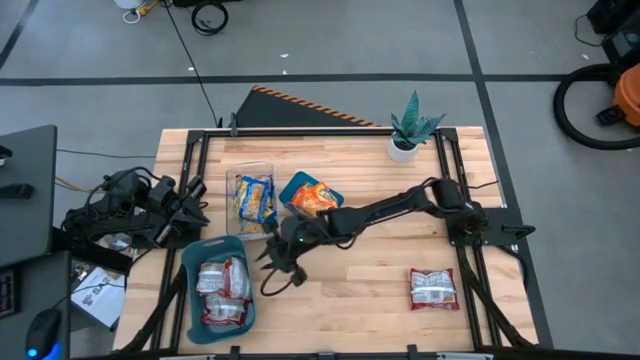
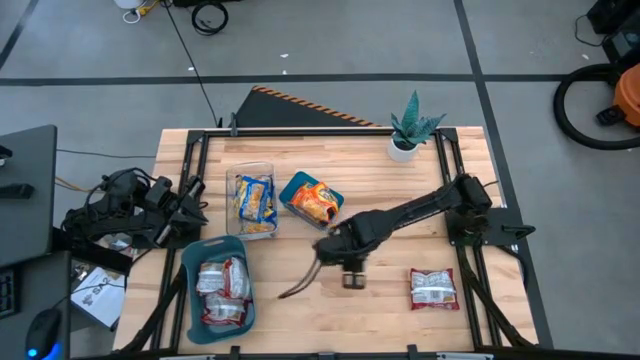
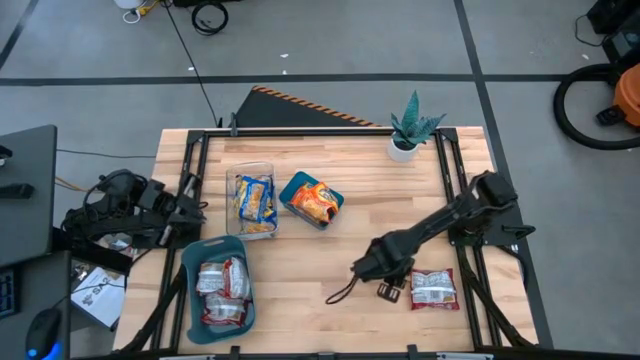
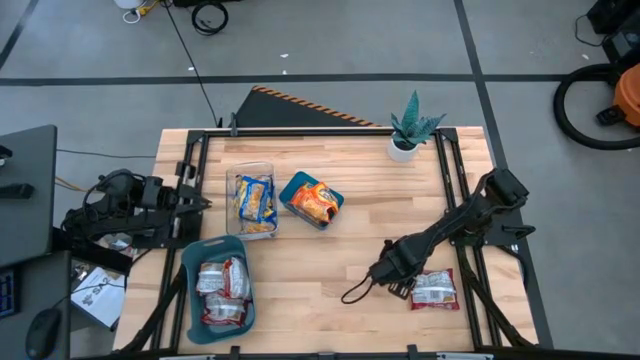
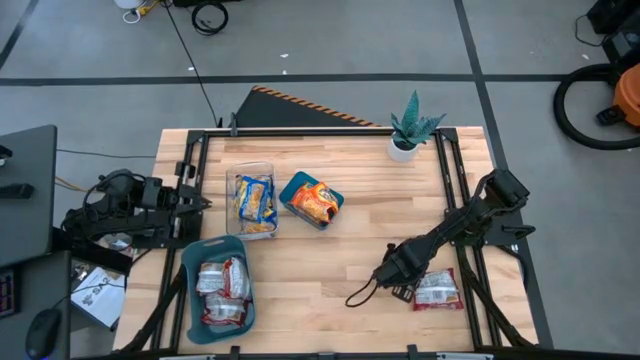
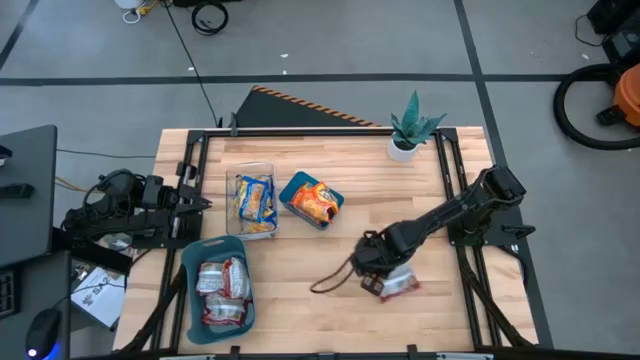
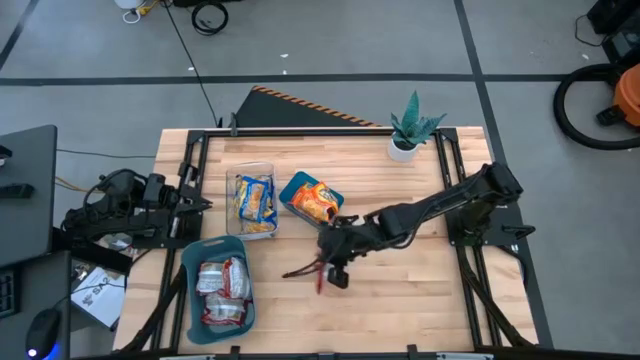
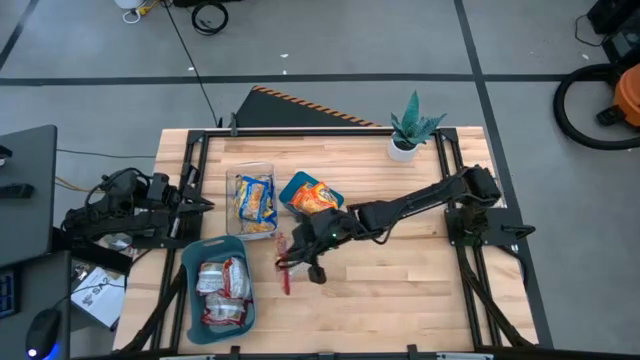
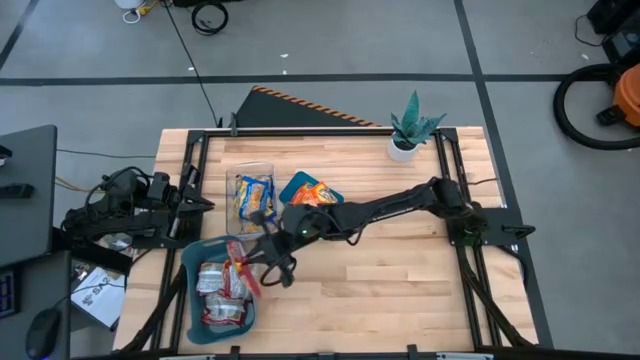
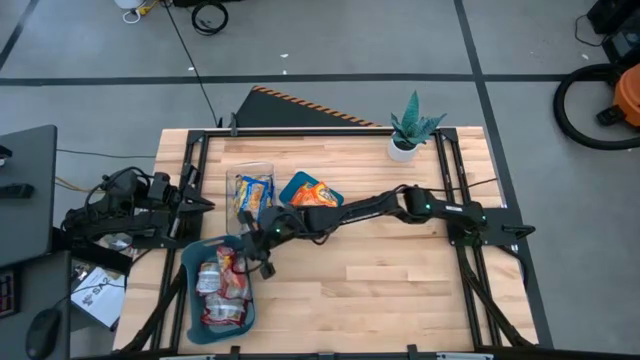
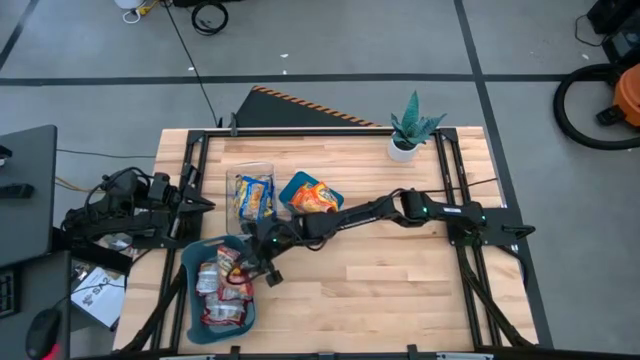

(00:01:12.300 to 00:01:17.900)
Task: Sort Maruchan noodles
Put the red noodle pack into the blue bin

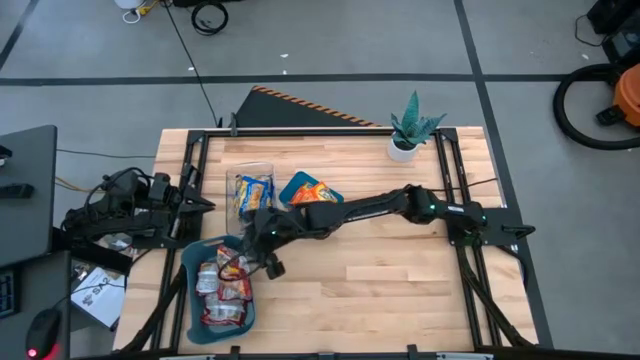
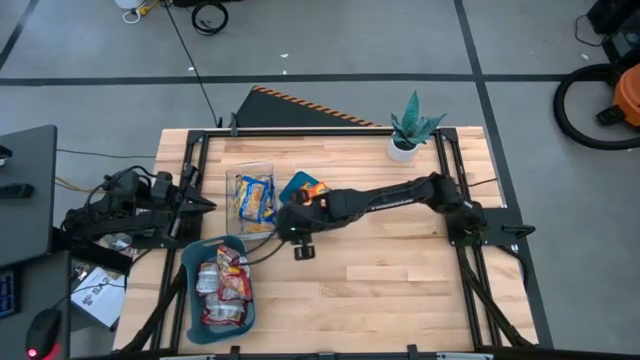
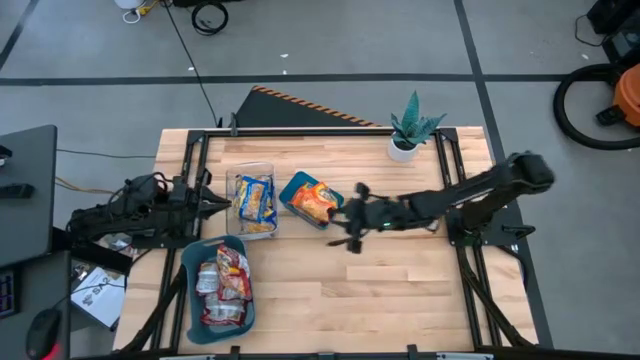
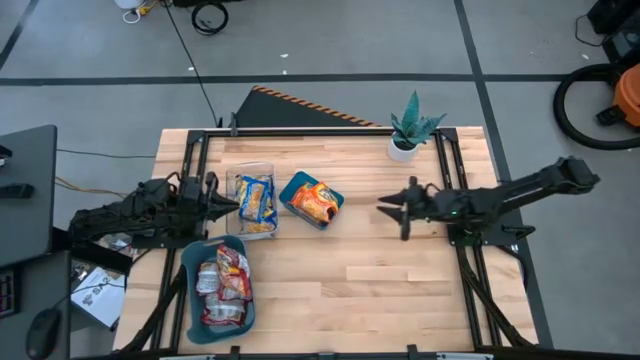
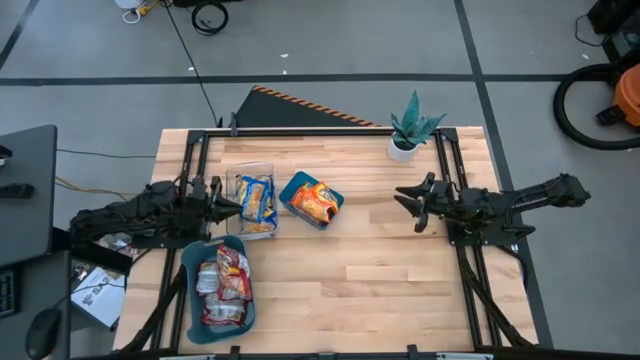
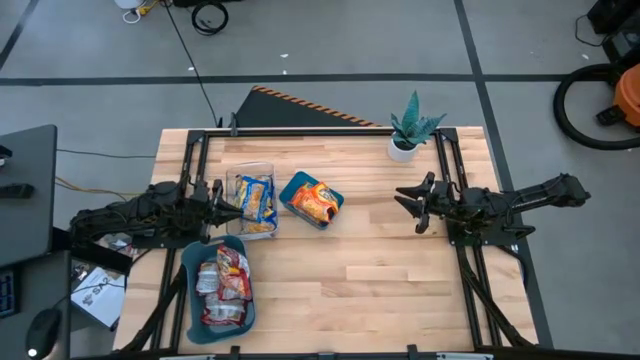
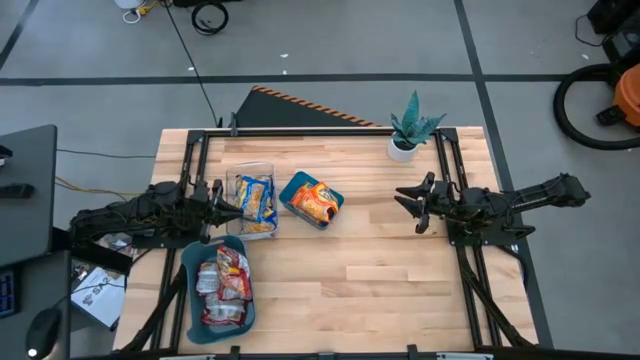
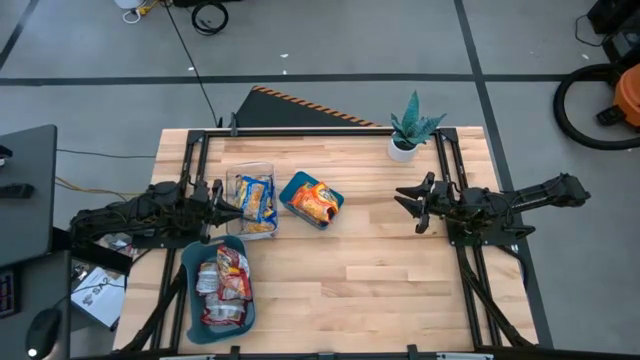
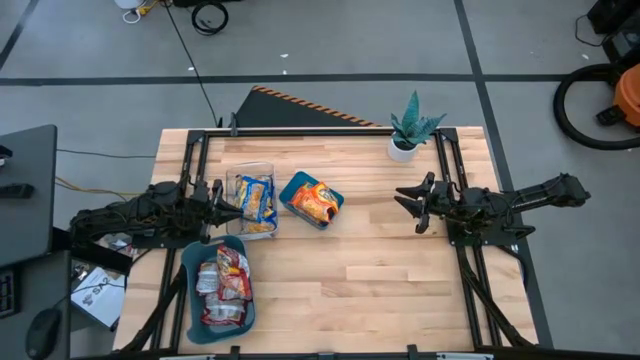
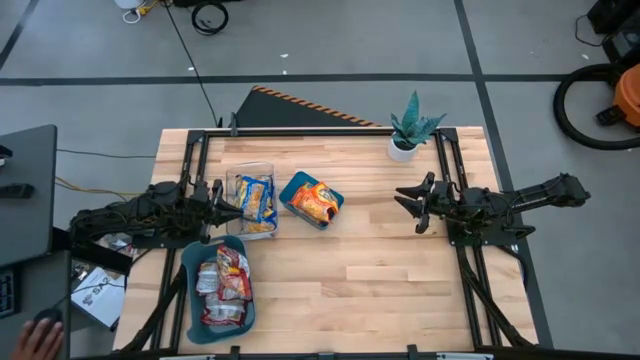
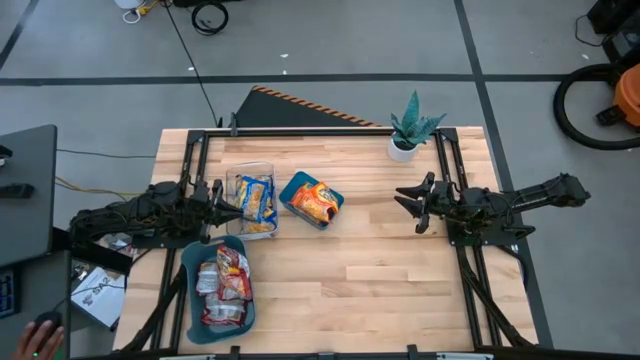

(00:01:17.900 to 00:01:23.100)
Return to Home Position

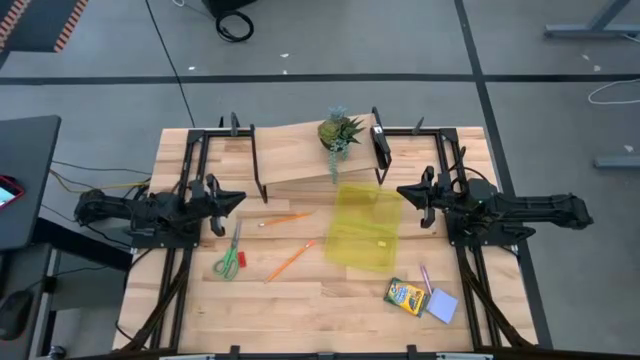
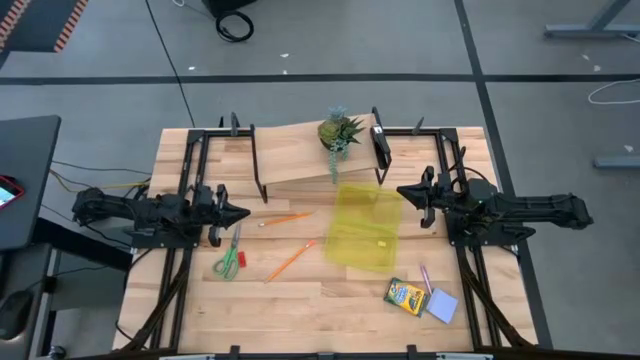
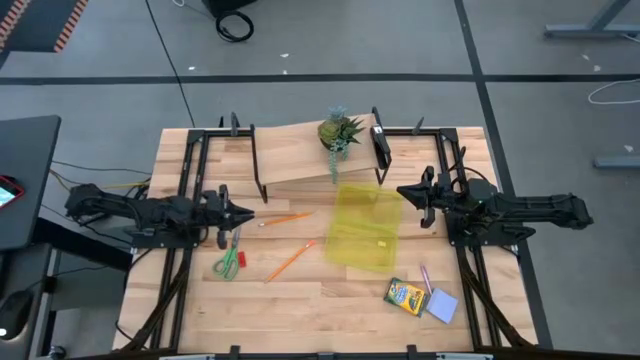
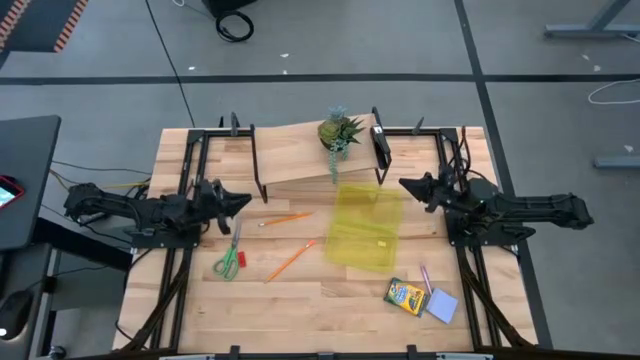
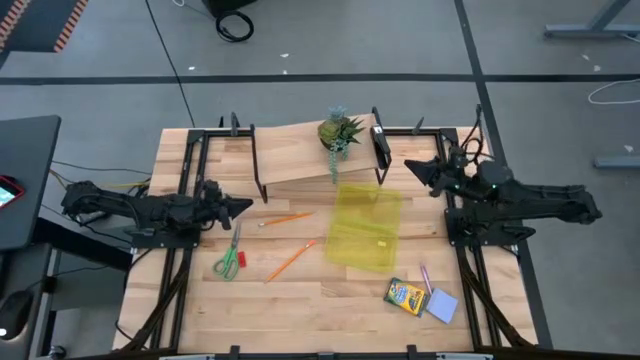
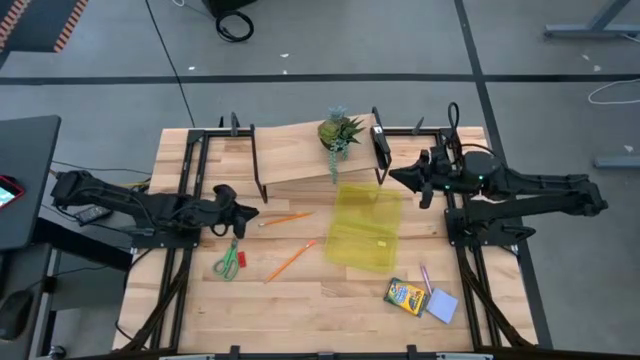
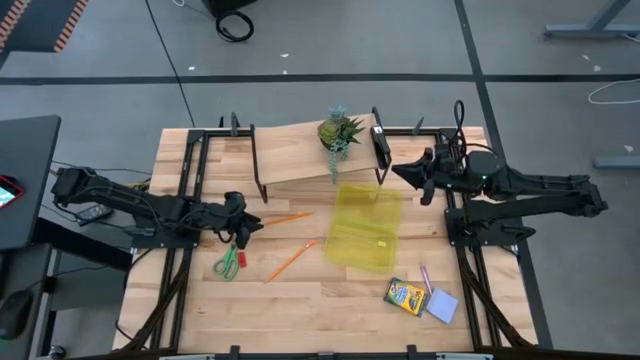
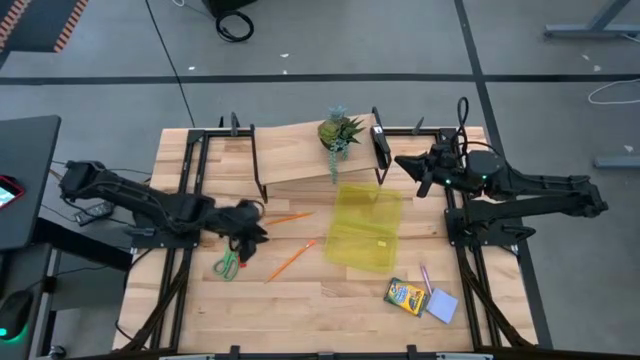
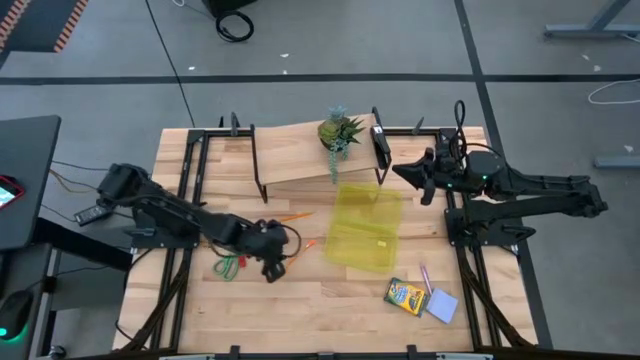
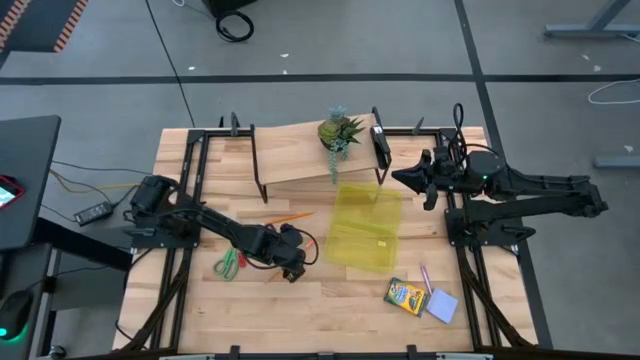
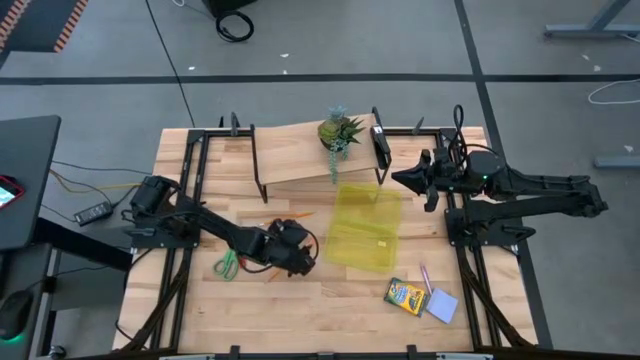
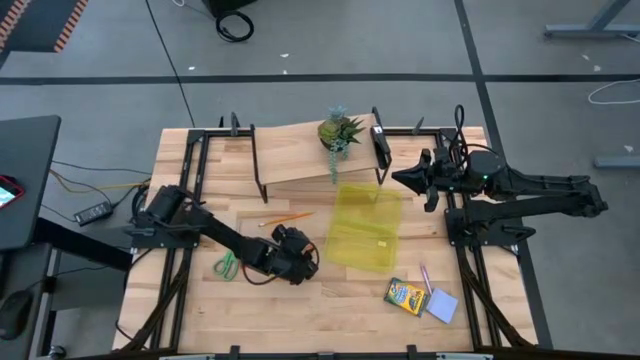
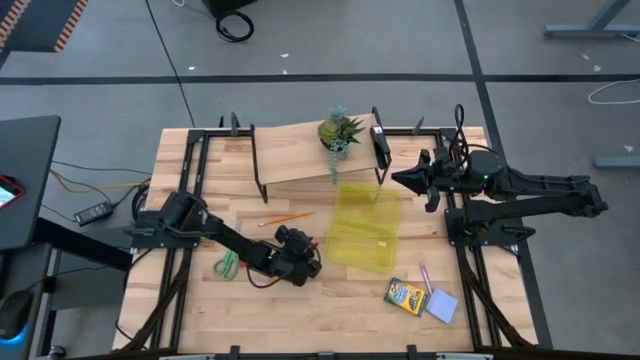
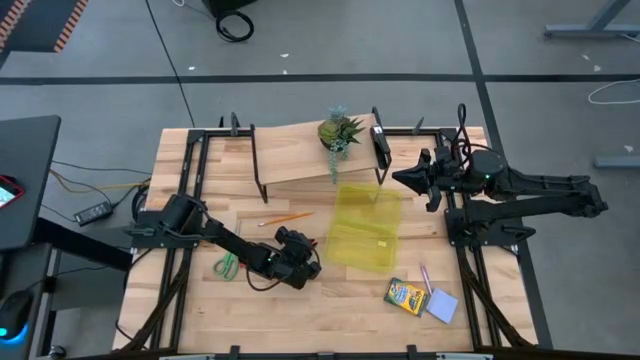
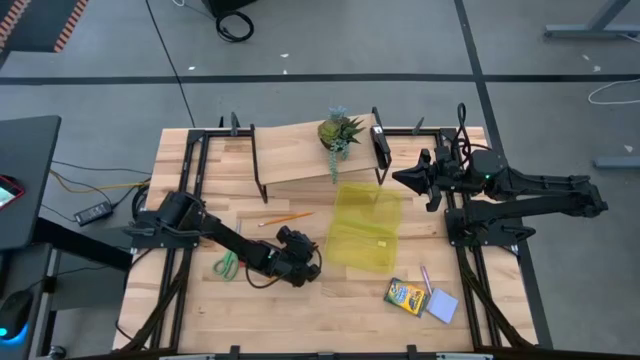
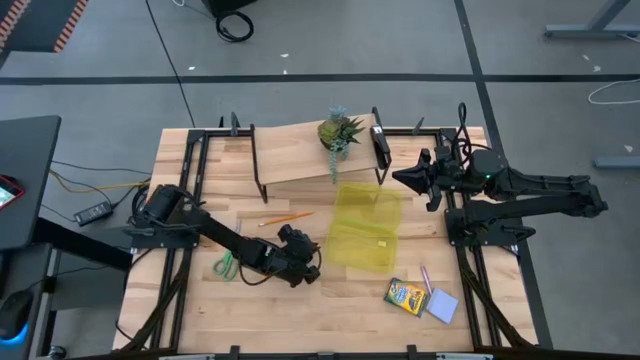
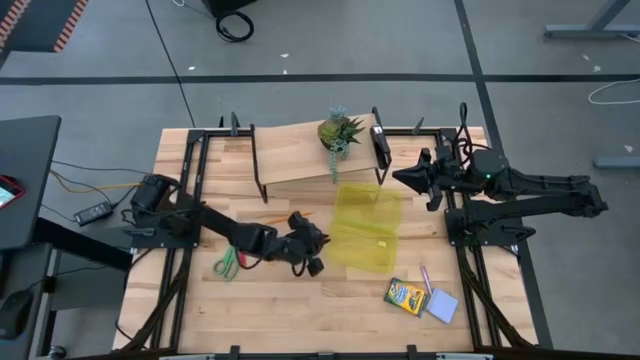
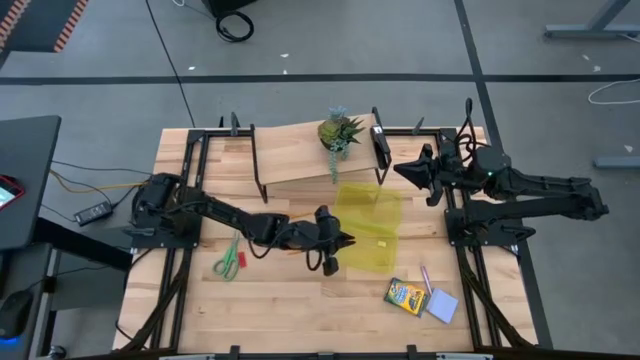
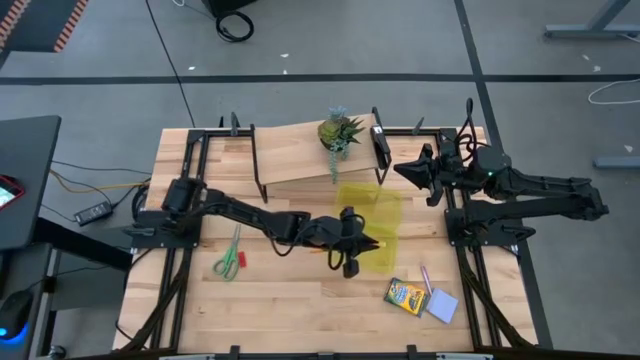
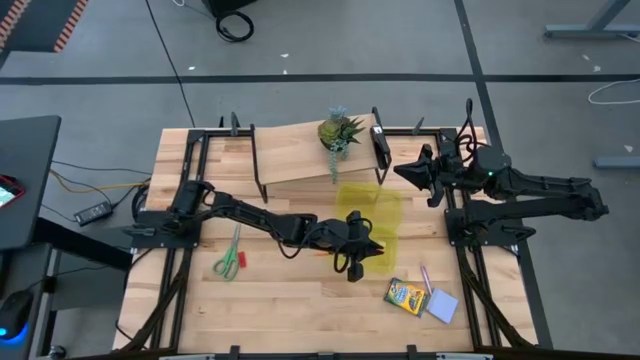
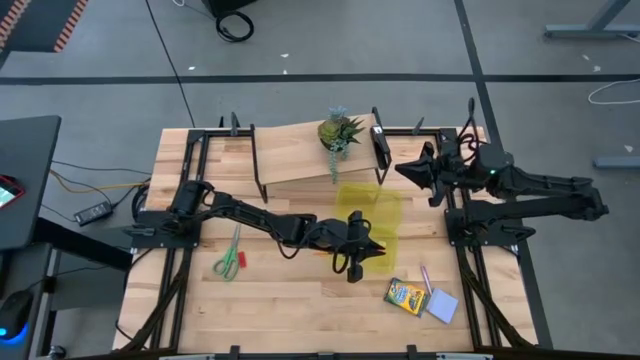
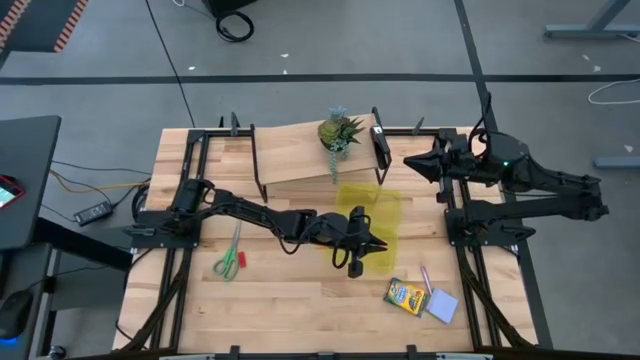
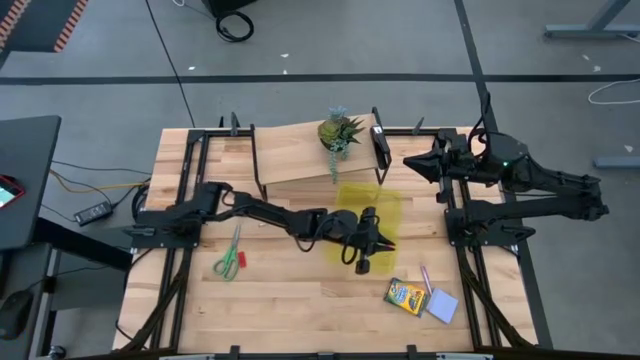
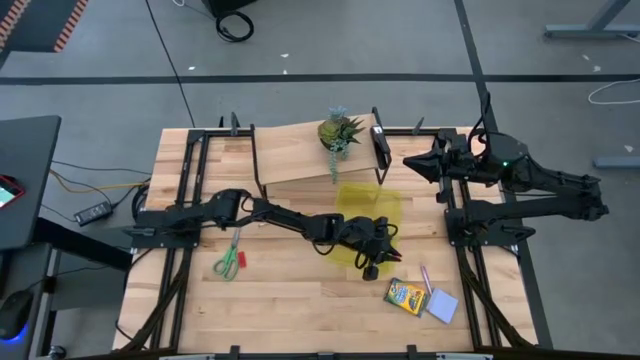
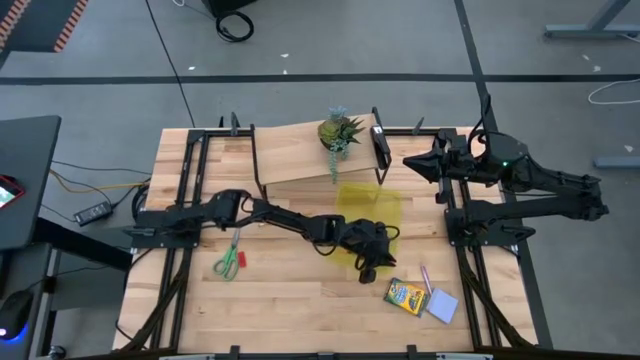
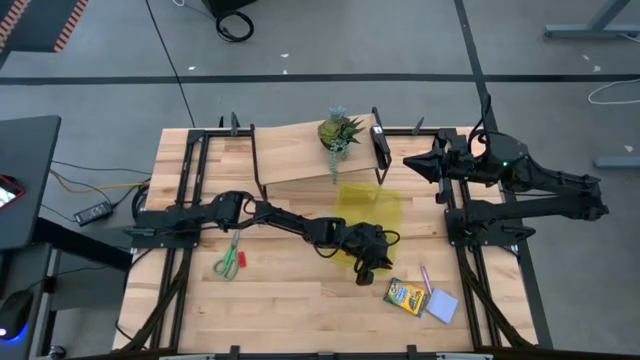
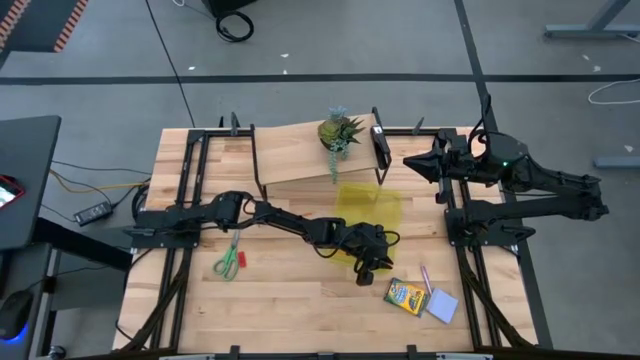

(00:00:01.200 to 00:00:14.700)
Task: Pack school essentials
Put the bottom orange pencil into the yellow supply box
